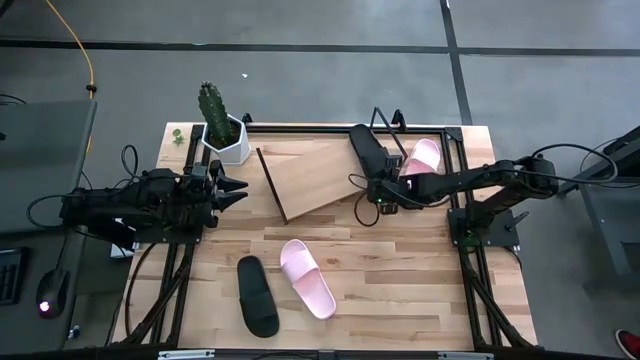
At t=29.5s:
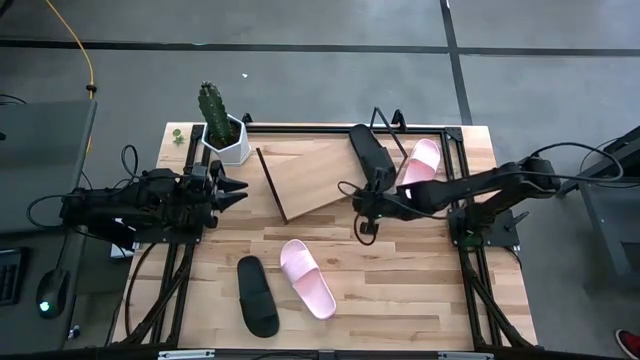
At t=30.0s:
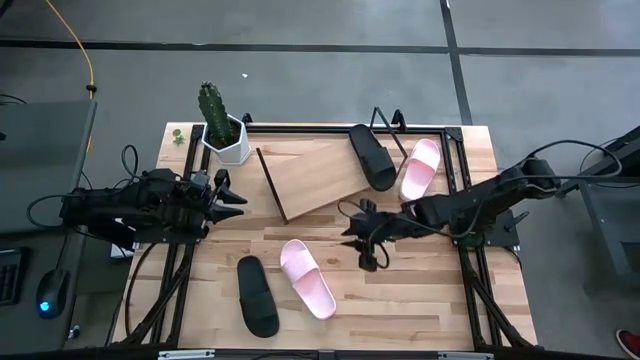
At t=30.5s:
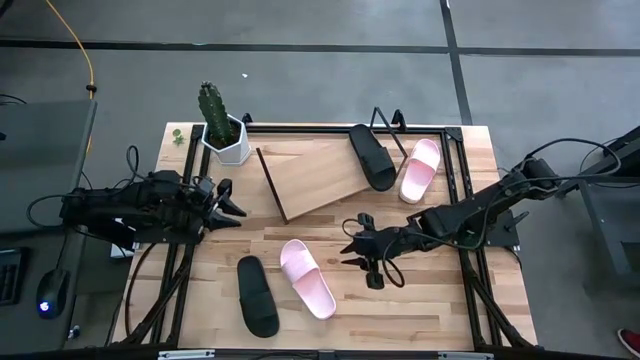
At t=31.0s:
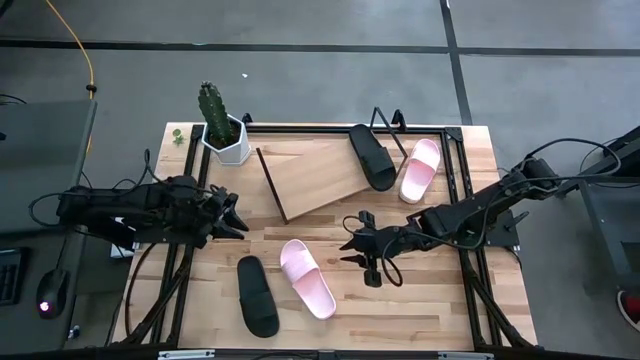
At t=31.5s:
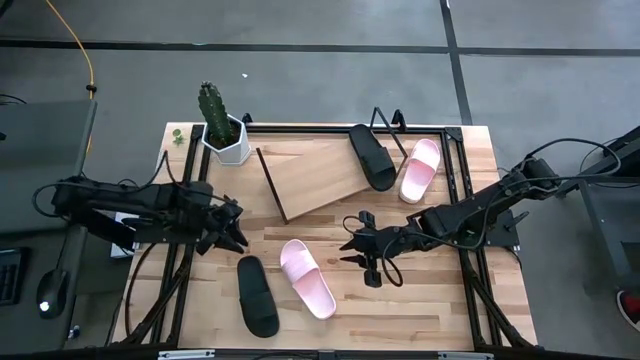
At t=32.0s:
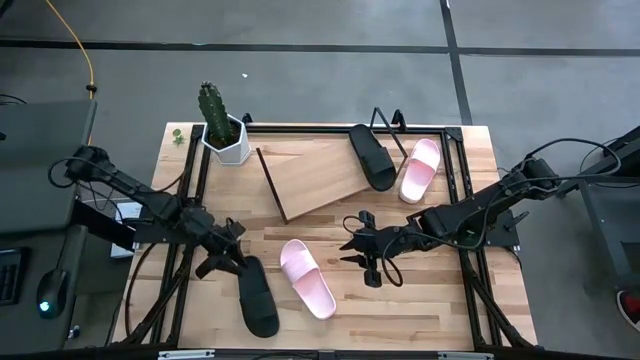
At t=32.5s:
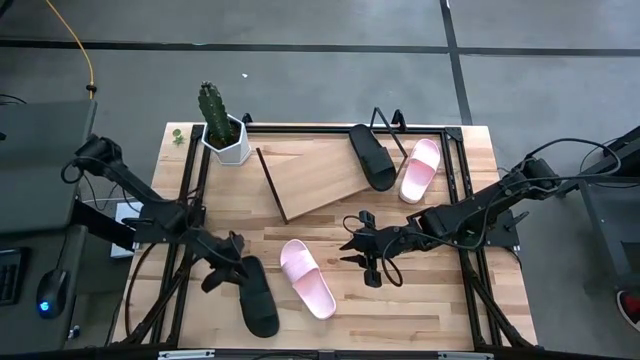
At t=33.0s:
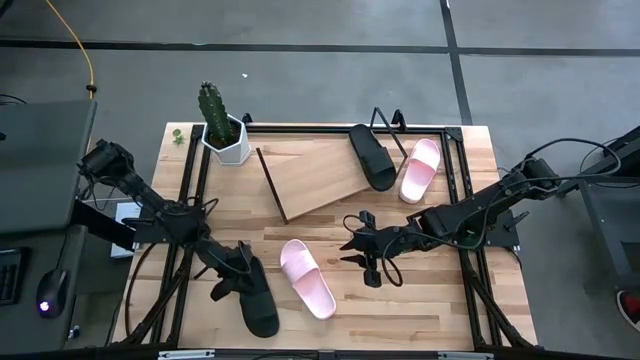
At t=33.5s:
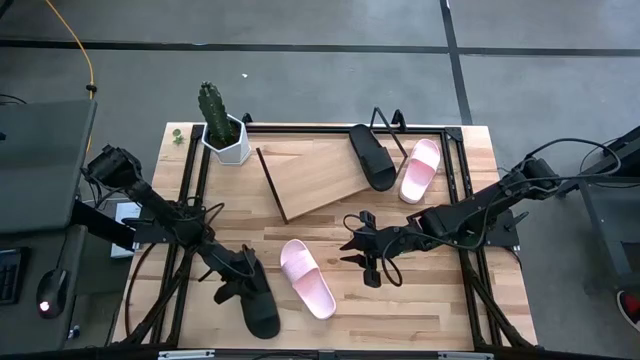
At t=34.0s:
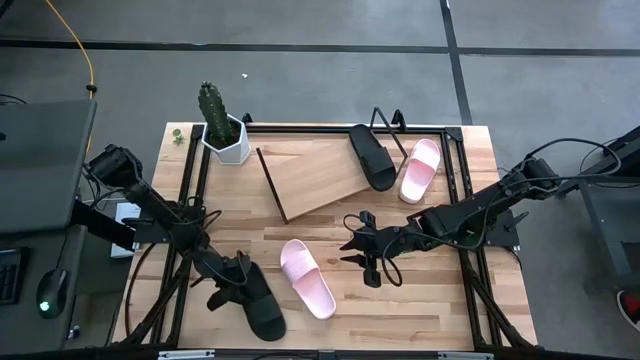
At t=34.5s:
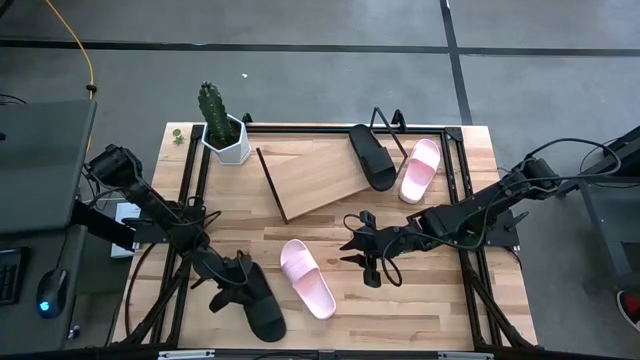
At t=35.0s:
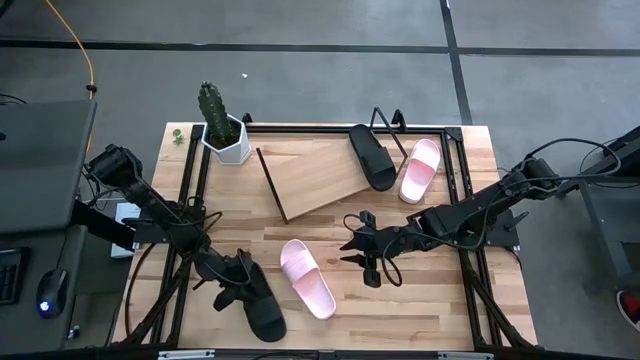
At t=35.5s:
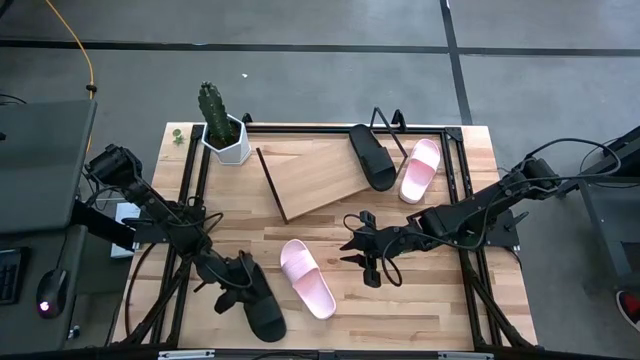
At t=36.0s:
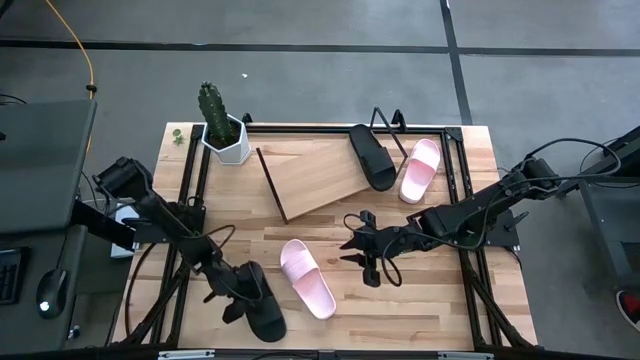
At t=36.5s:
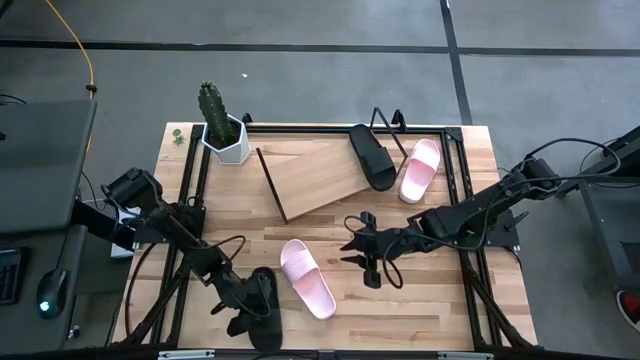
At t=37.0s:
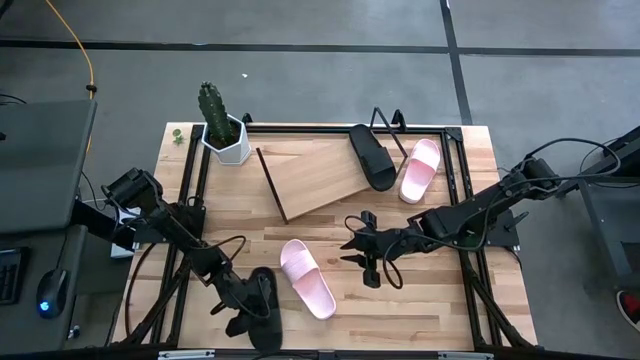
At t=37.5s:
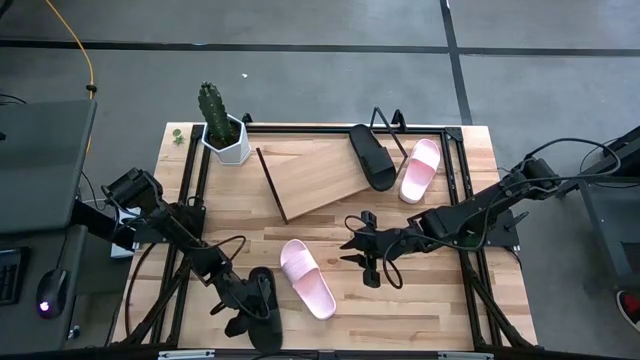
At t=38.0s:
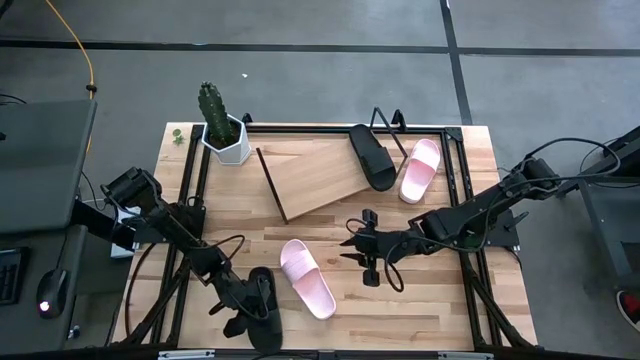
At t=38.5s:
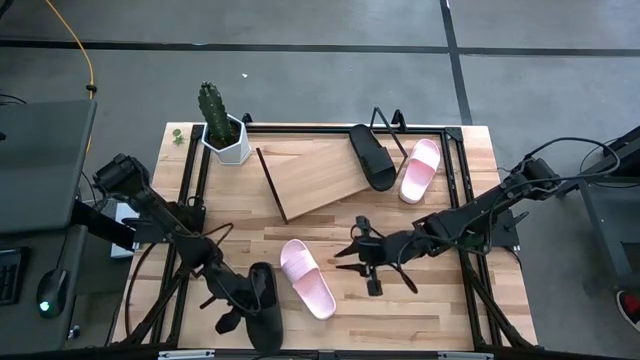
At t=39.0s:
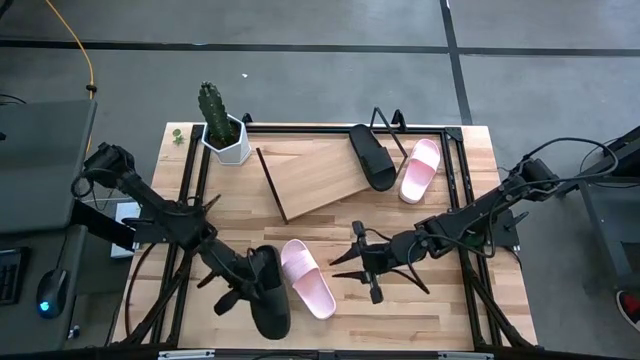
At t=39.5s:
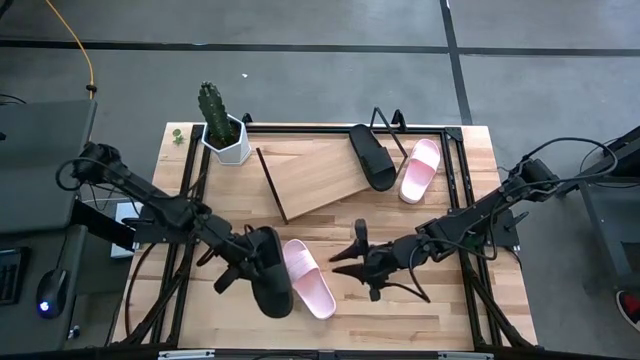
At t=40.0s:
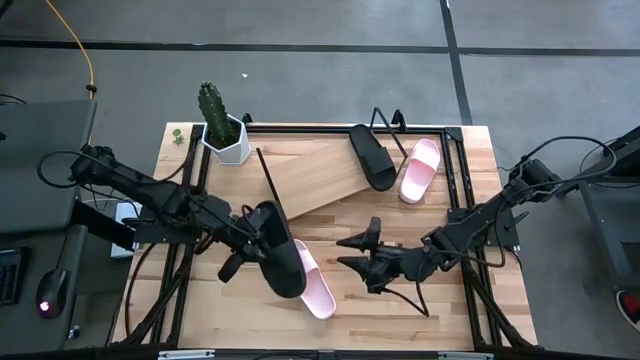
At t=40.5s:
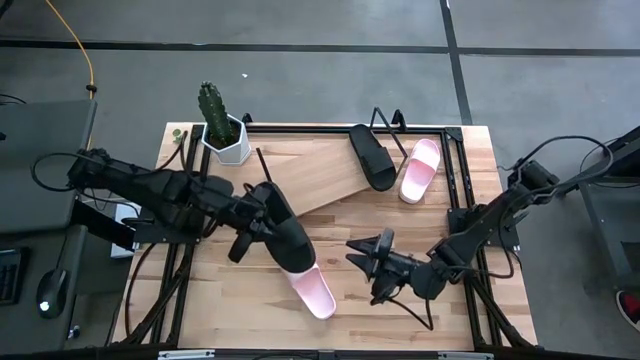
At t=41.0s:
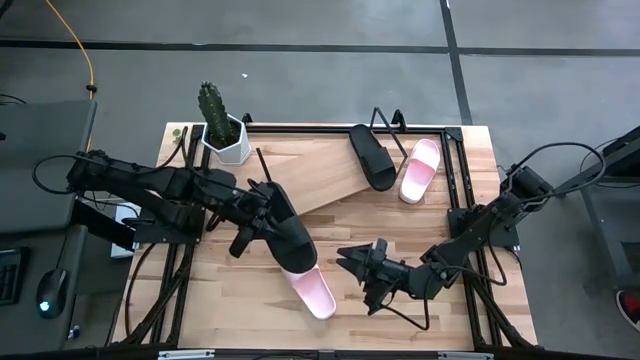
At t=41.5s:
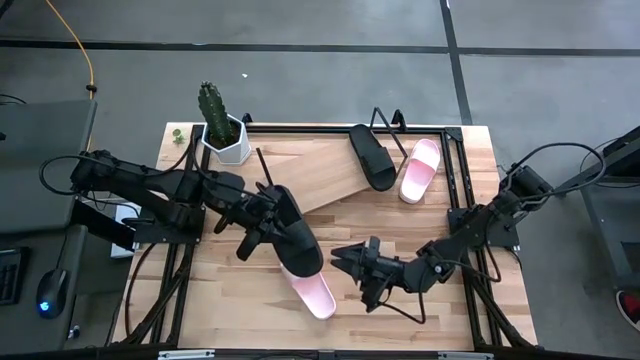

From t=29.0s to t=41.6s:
Task: Pick and place slides into the shelf
Put the left black slide on the shelf

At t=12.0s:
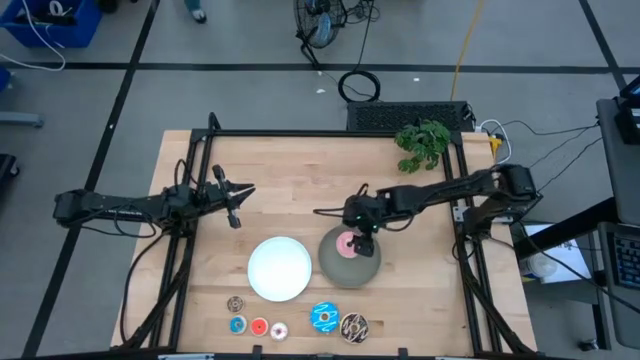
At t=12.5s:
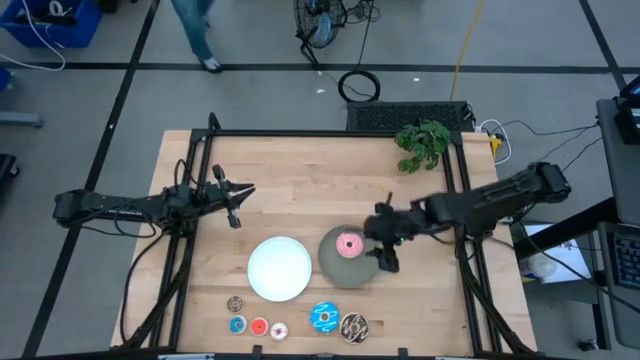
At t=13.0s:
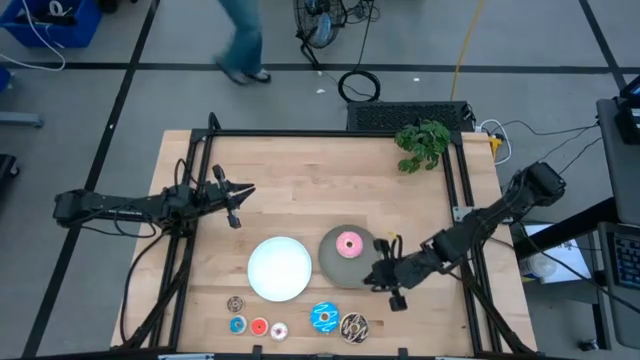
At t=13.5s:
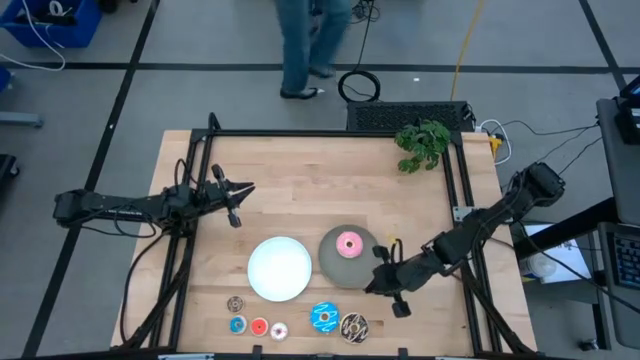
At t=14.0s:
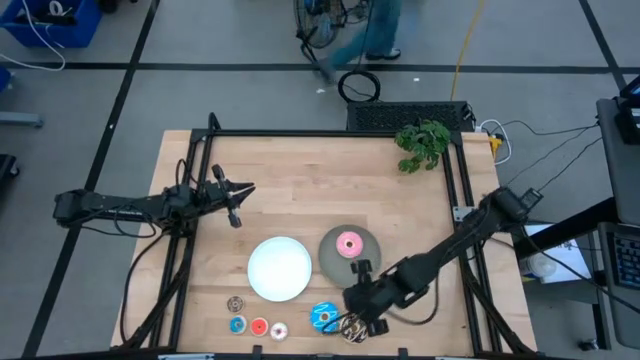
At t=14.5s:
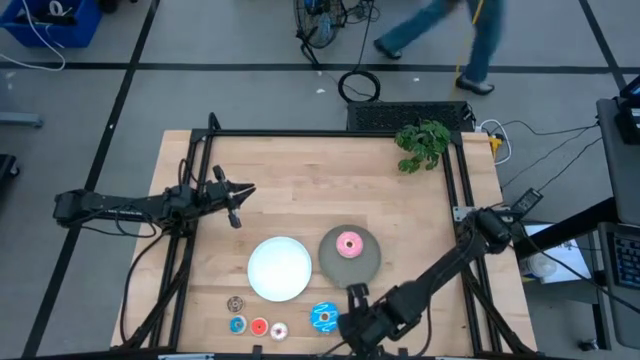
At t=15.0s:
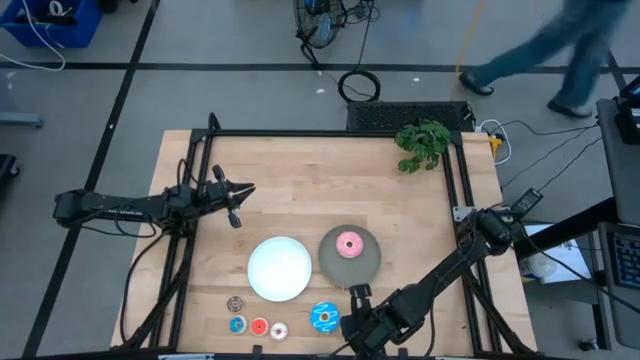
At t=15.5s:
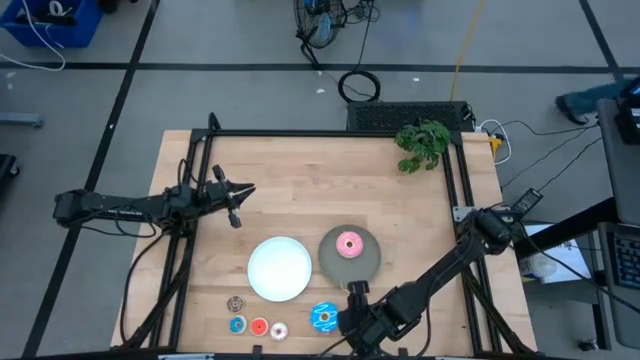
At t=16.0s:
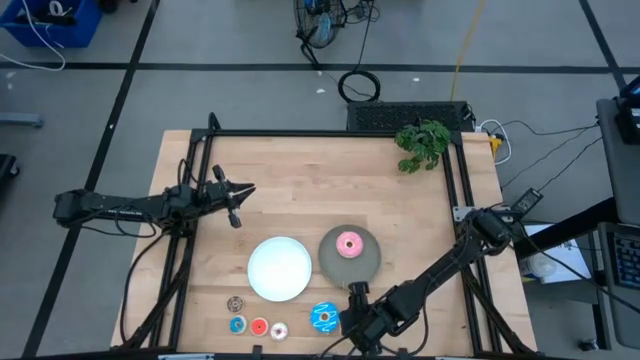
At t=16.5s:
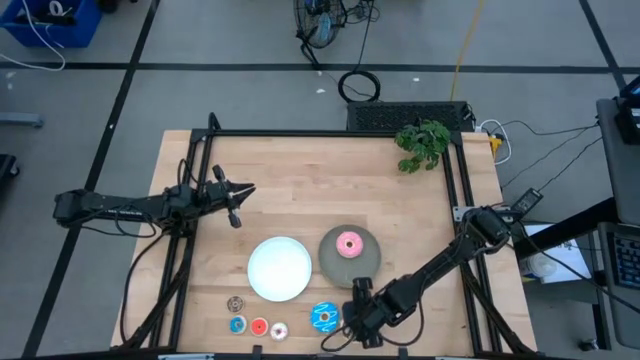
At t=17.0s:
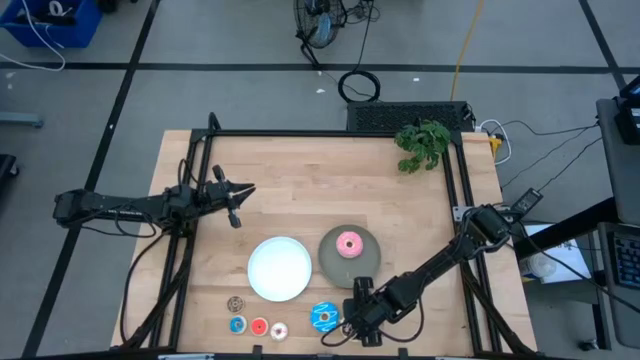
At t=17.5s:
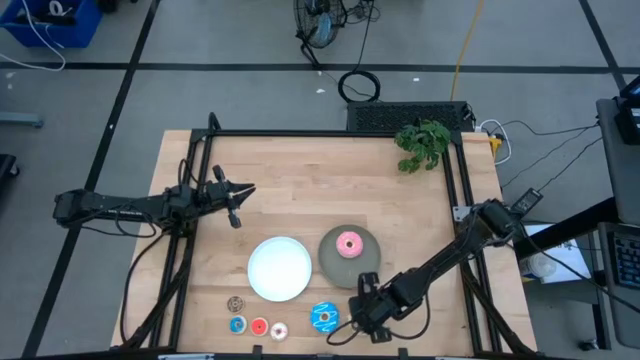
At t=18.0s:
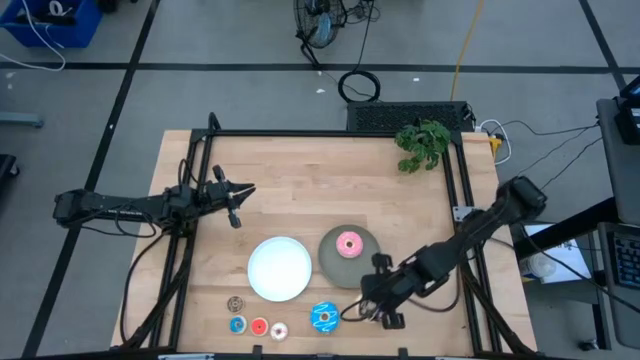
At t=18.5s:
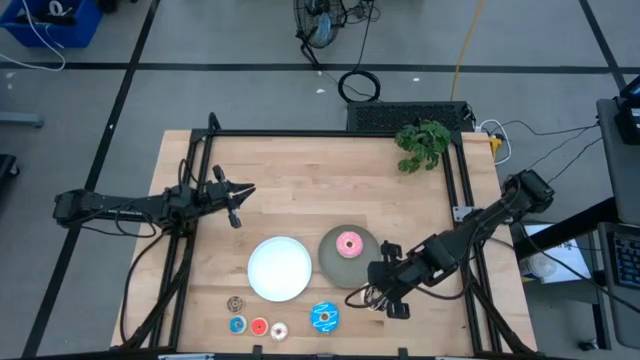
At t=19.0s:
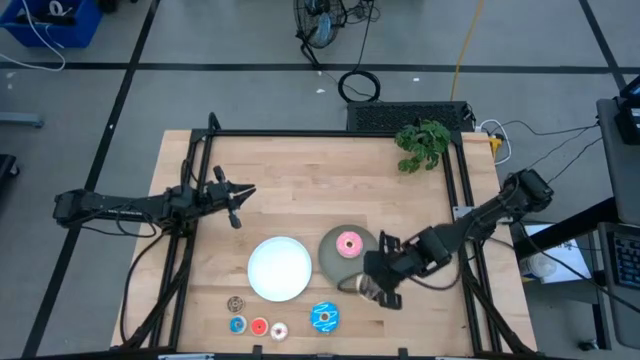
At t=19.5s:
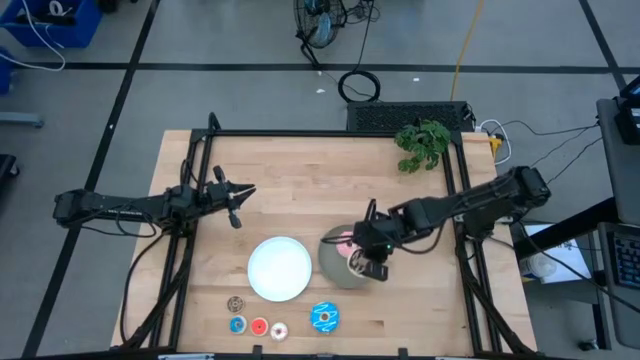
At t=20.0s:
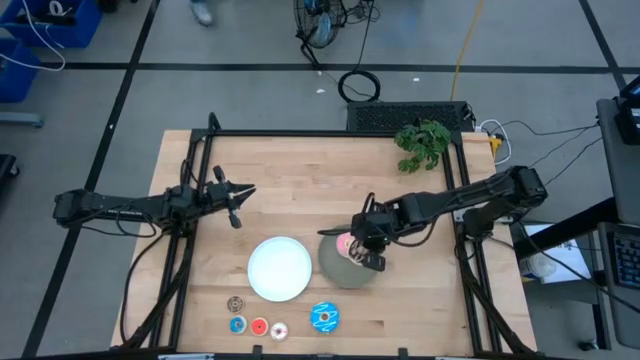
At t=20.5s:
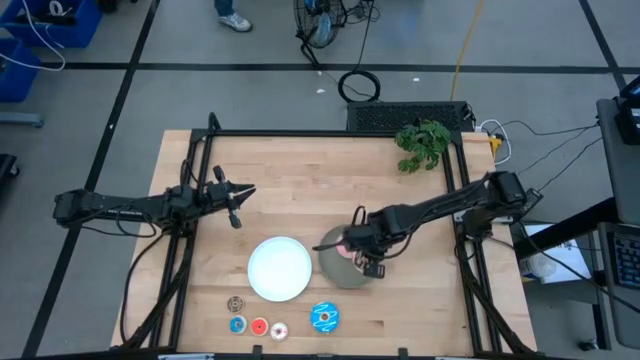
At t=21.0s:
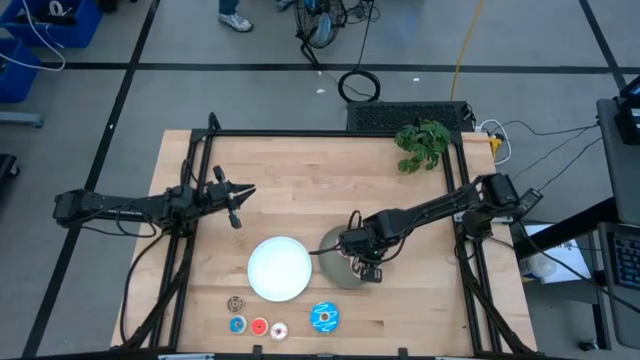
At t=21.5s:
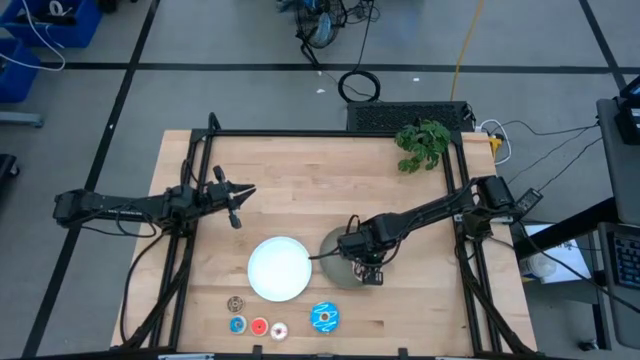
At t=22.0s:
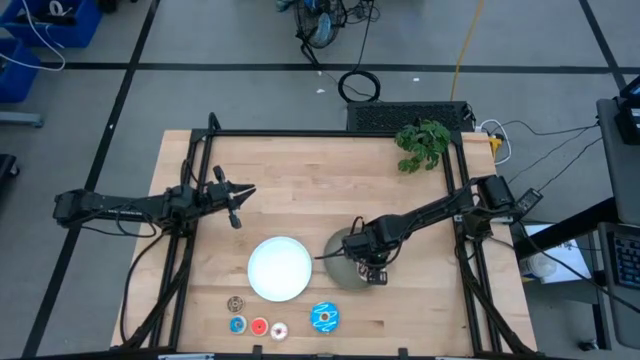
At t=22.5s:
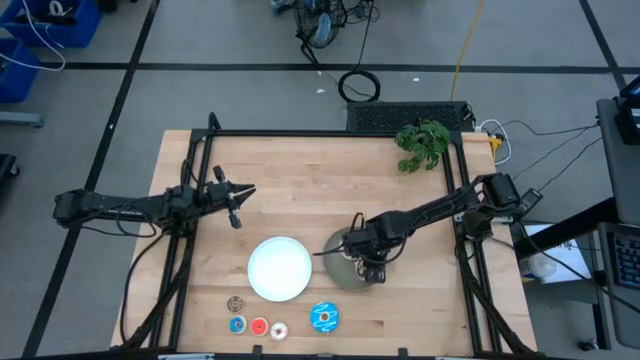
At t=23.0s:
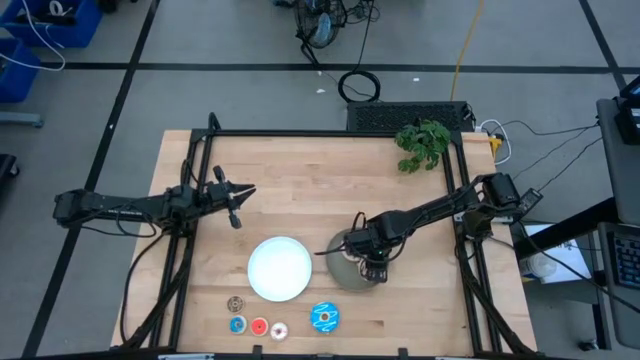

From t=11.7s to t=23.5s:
Task: Pick & Place donuts
Put the large black donut on the gray plate
